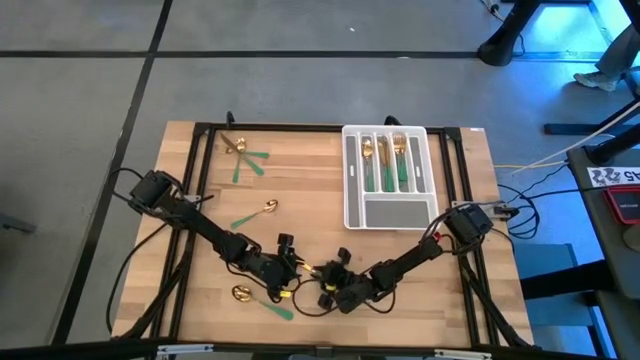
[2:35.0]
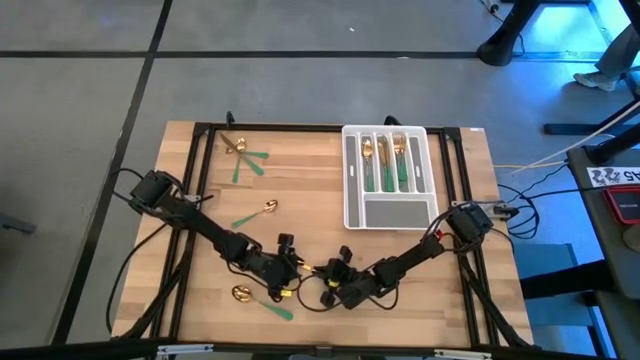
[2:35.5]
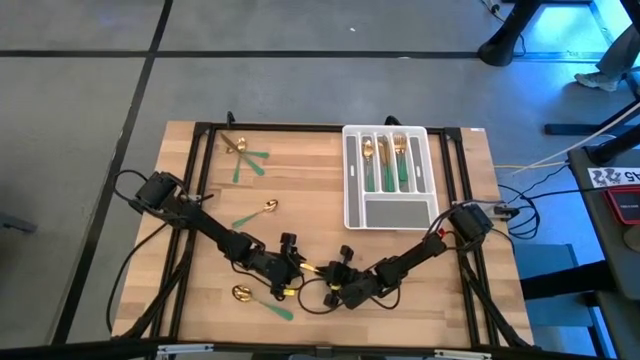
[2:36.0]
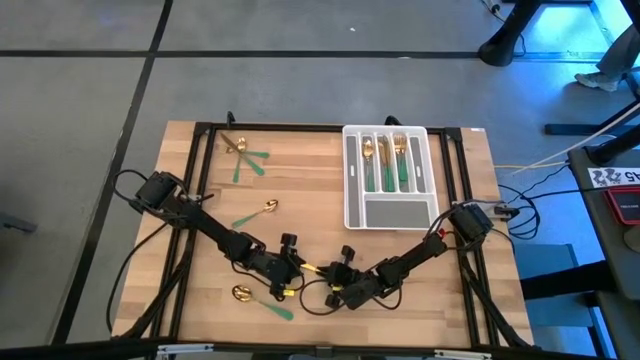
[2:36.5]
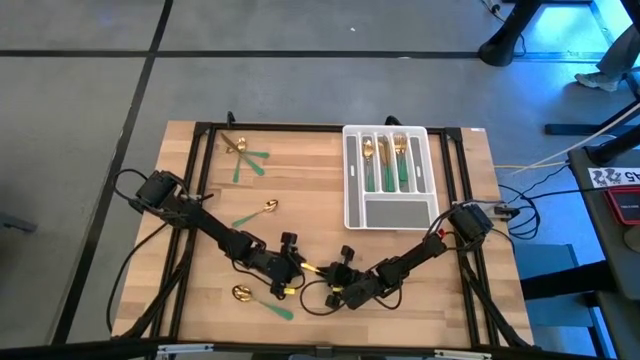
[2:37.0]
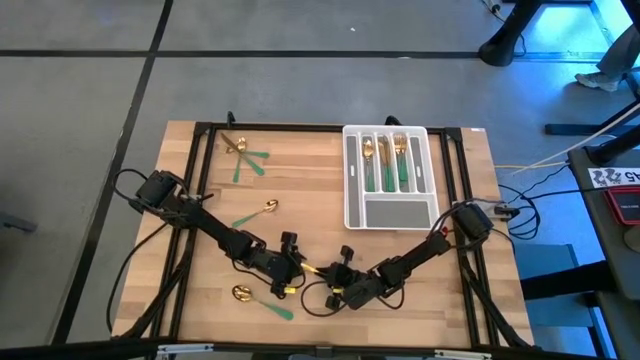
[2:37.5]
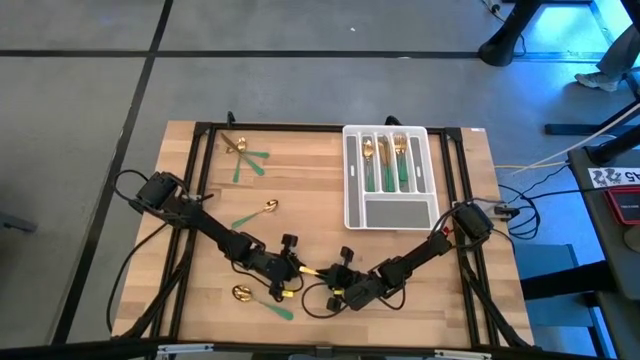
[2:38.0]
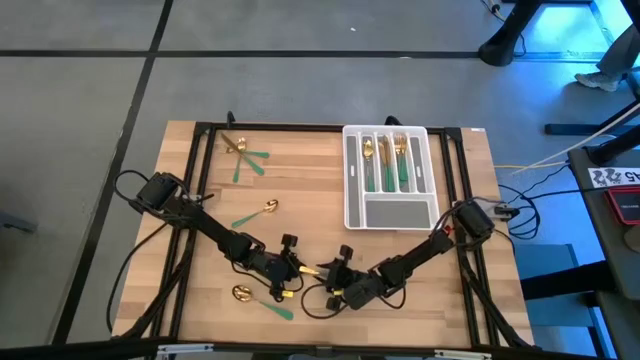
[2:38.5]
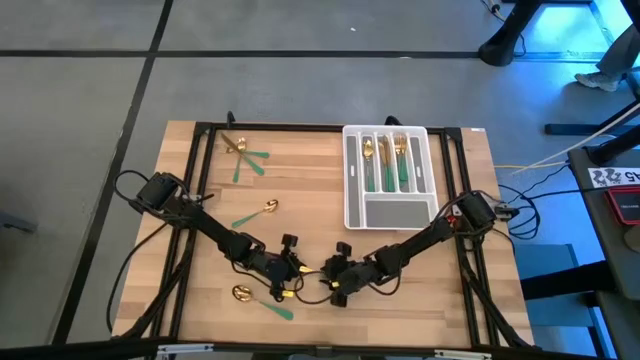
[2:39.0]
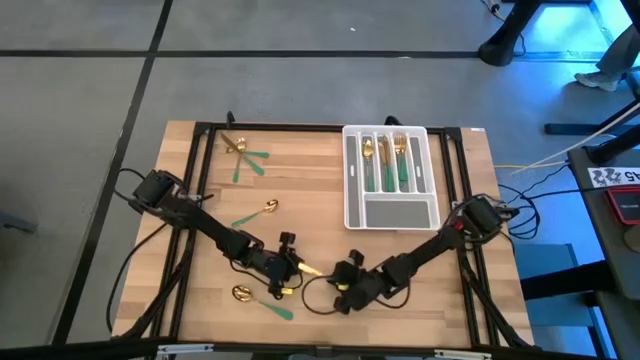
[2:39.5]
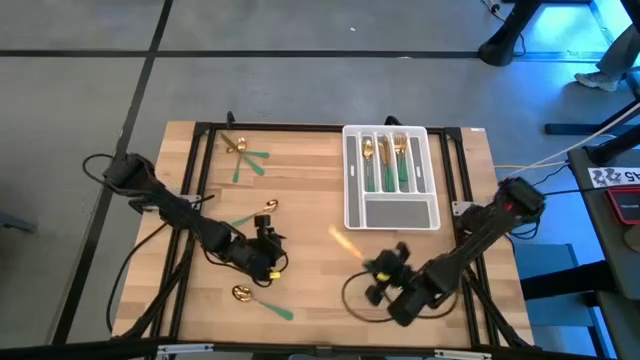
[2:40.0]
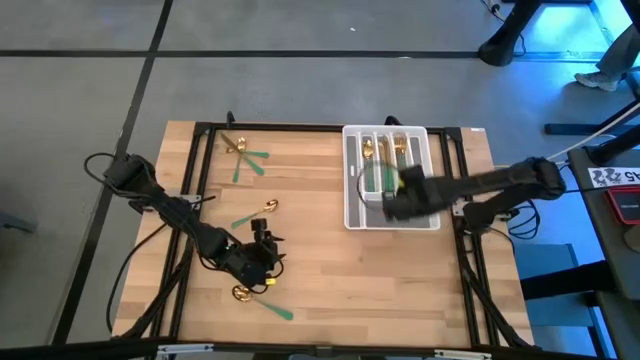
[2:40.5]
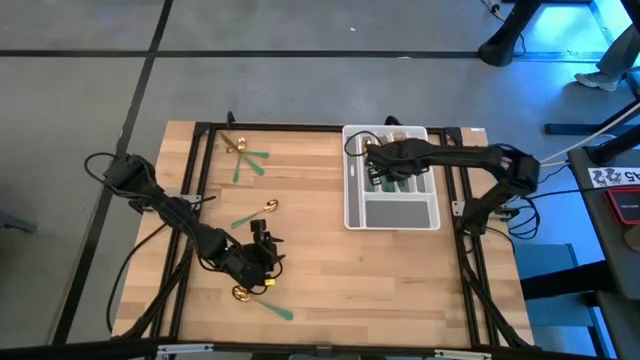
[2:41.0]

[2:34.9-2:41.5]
Task: Sort silverware
Put the green knife into the silverware tray

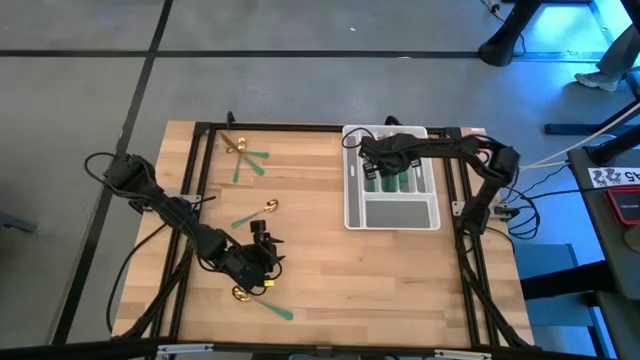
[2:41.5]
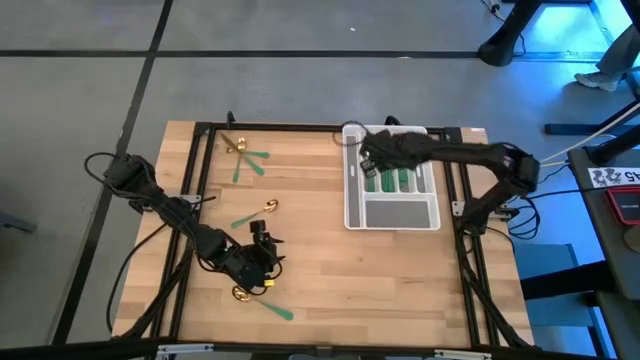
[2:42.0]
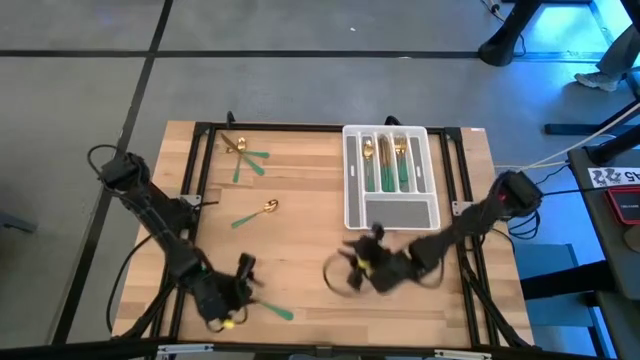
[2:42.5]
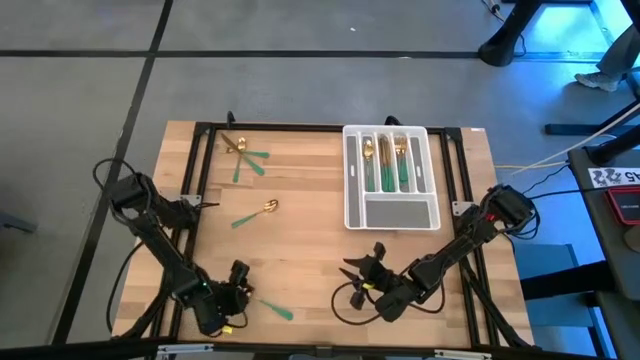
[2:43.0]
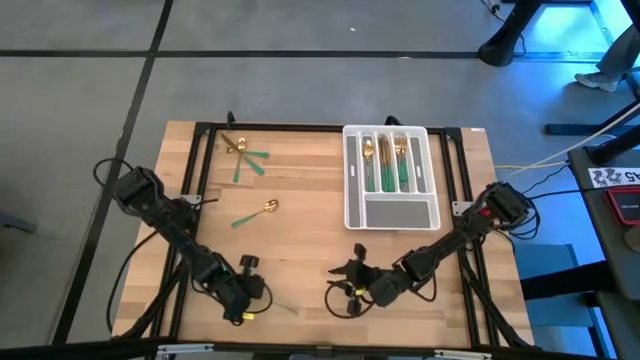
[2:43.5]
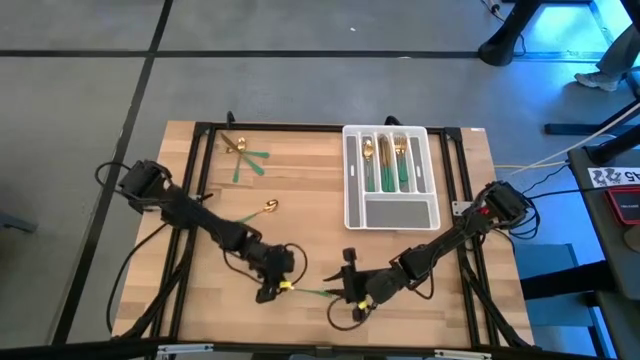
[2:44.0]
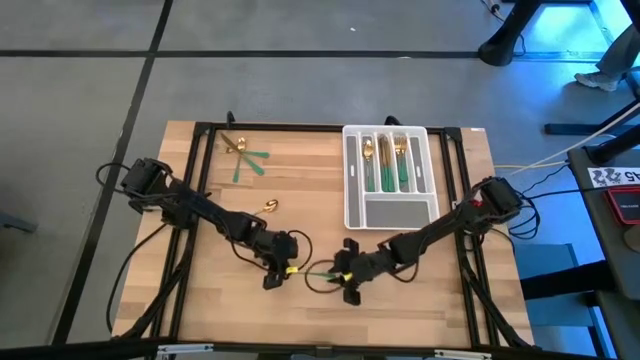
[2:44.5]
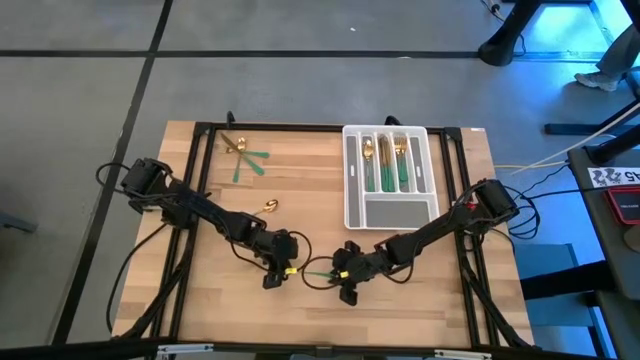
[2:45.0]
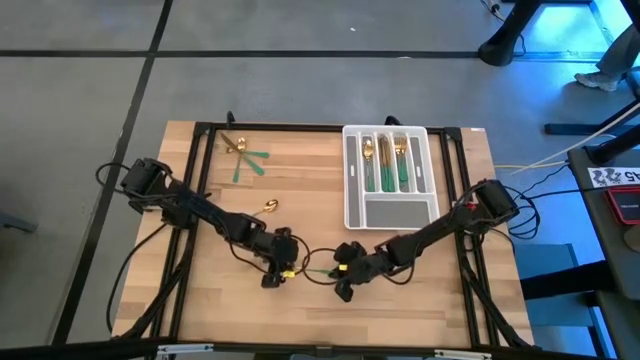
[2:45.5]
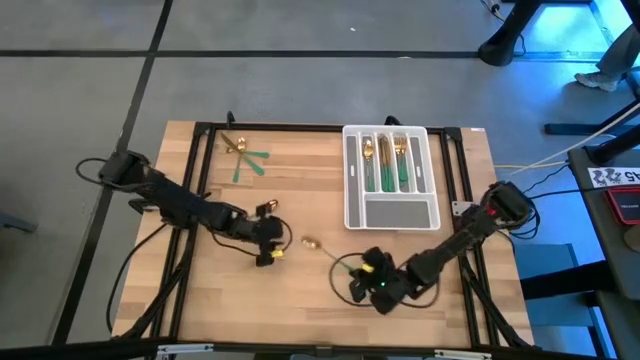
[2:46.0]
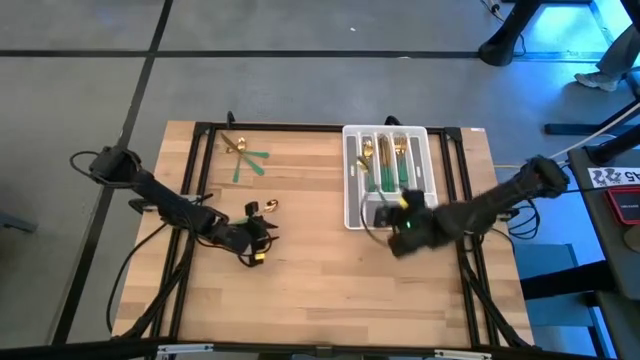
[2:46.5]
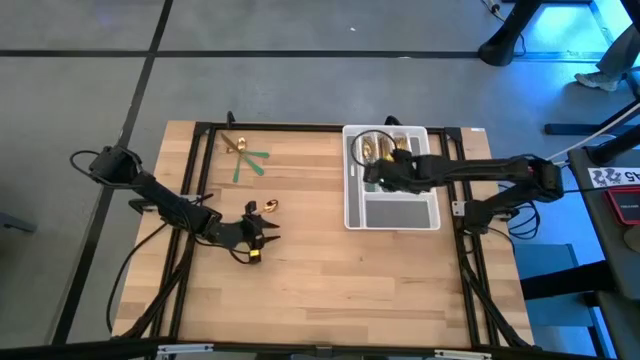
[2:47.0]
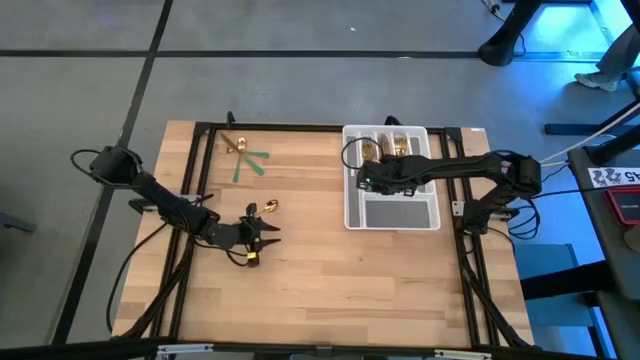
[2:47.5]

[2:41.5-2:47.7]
Put the green spoon into the silverware tray

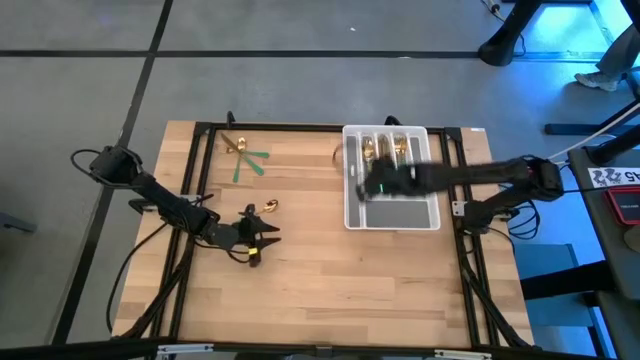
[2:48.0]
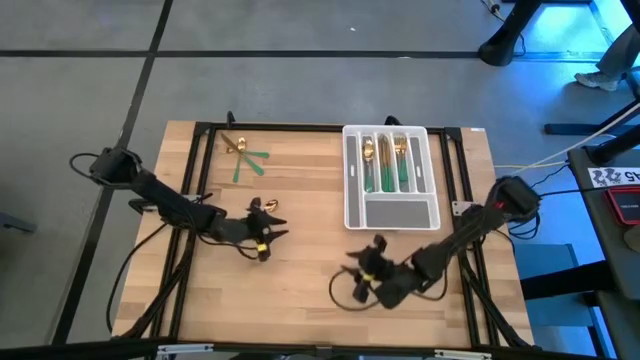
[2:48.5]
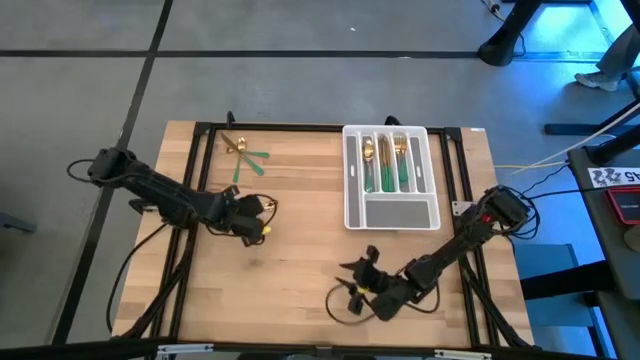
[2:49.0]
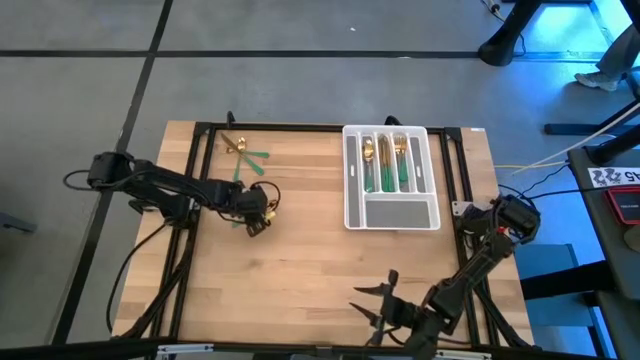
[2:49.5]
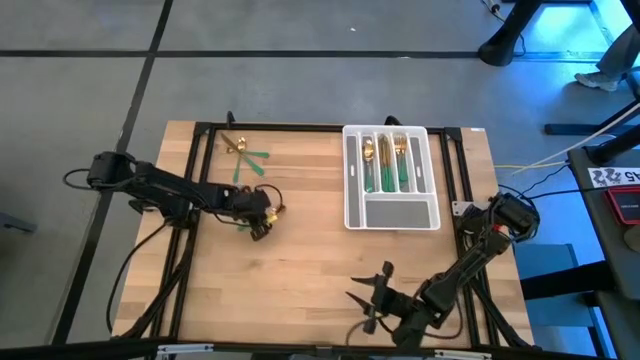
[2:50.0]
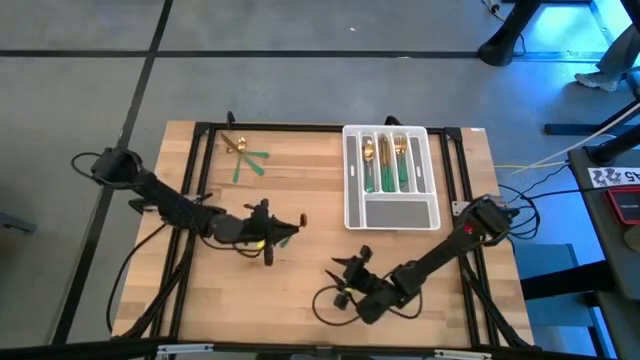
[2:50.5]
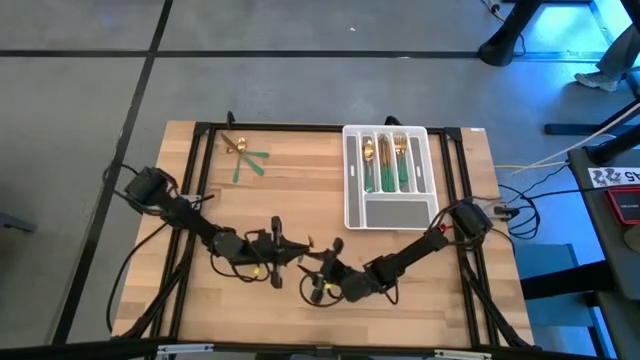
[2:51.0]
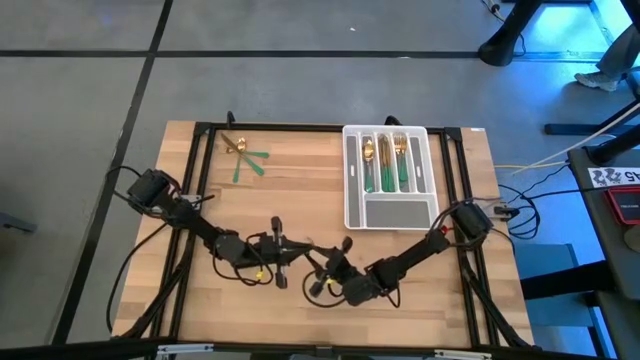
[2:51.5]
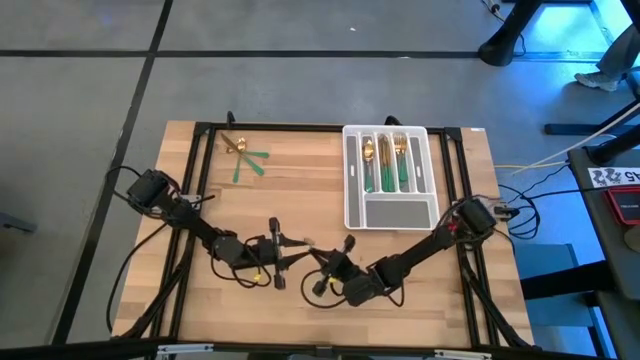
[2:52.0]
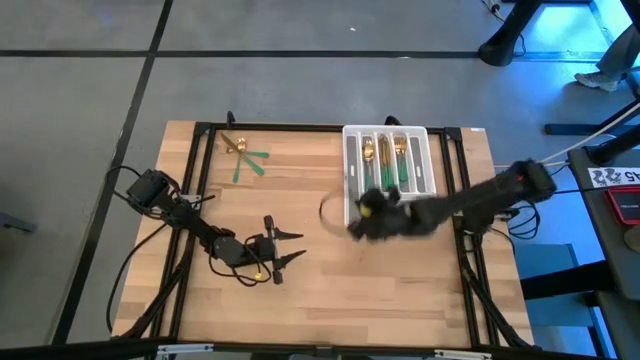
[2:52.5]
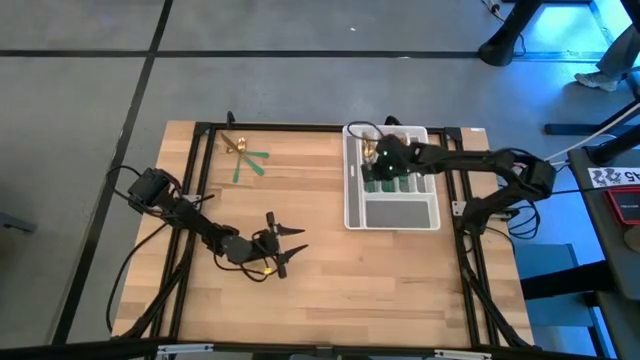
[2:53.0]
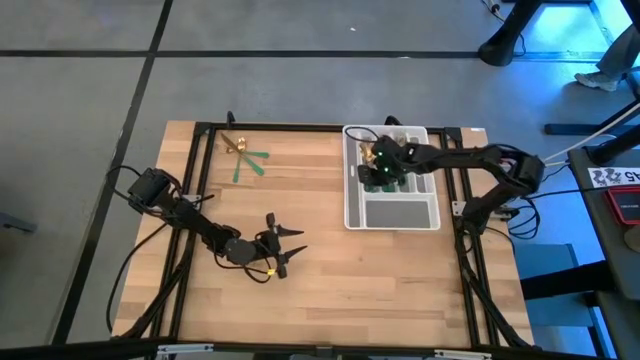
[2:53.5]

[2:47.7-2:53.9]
Put the green spoon into the silverware tray

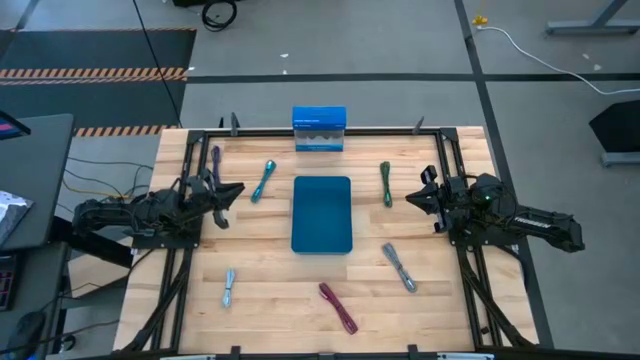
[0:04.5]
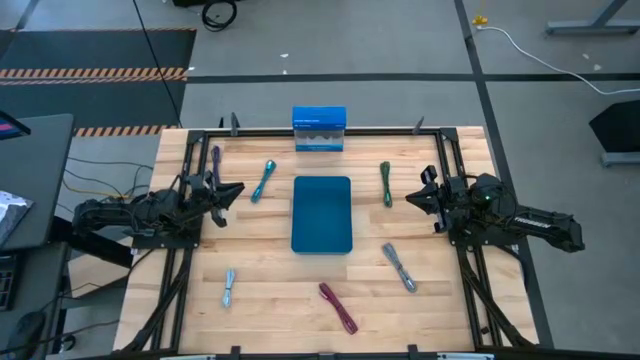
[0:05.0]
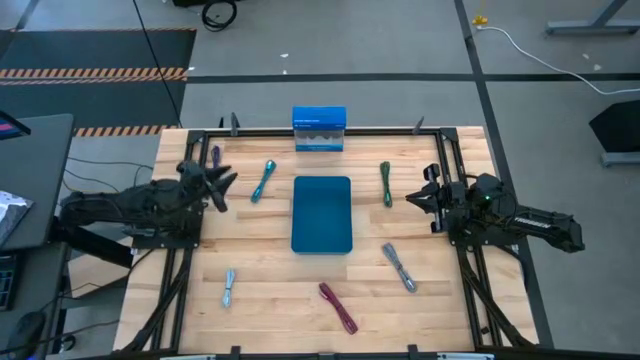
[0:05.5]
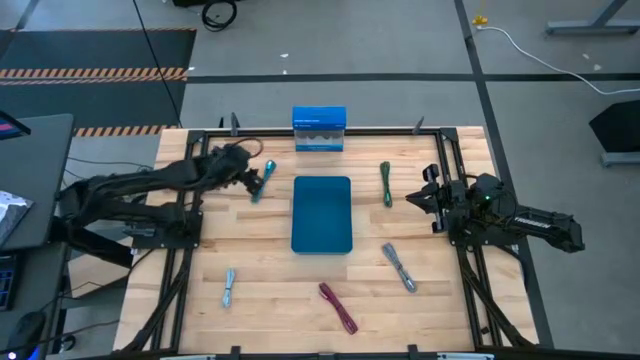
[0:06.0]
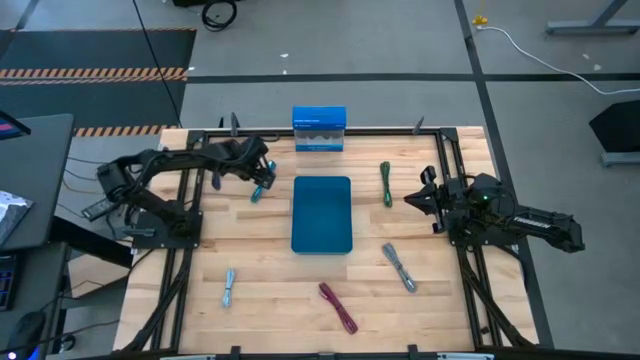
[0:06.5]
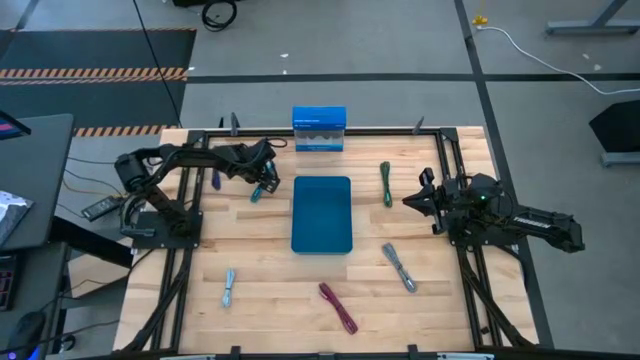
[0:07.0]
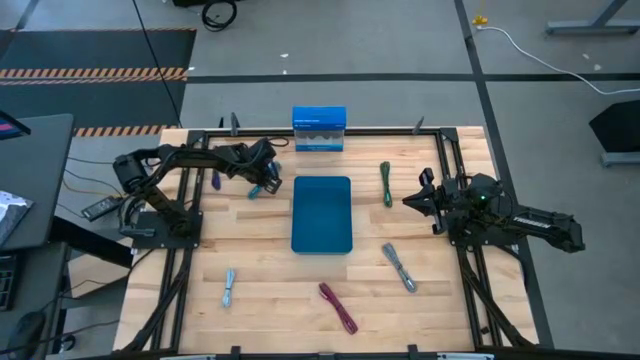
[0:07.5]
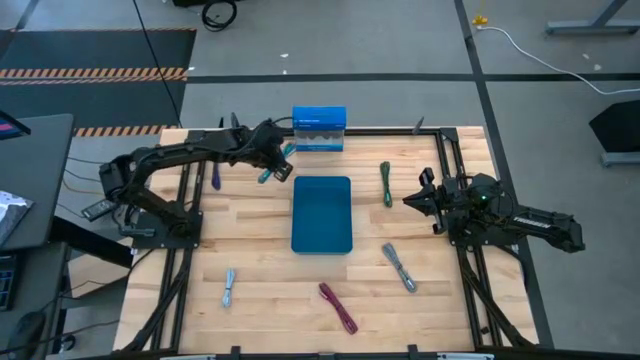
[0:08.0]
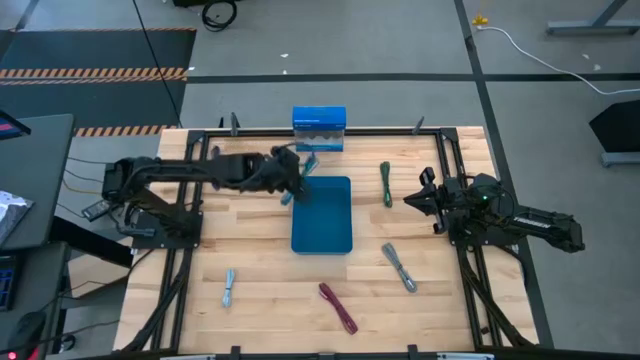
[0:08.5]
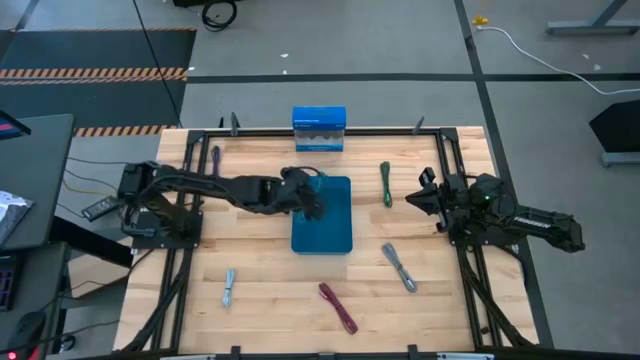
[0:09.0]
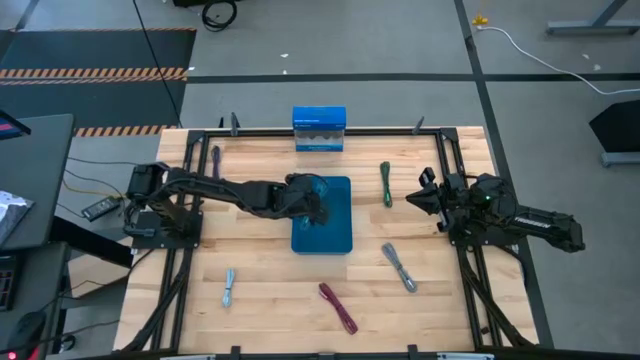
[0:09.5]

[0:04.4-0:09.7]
Task: Pick and place USB-C Cables
Put the blue charger cable into the blue bin
